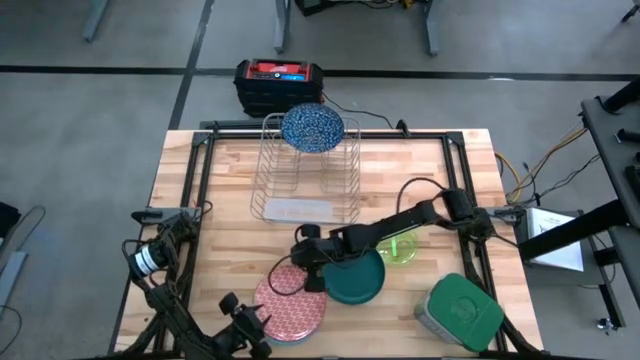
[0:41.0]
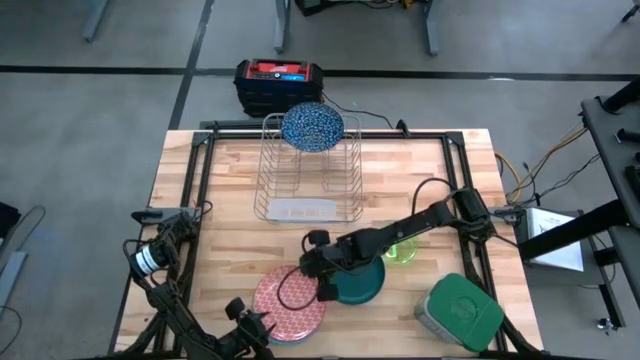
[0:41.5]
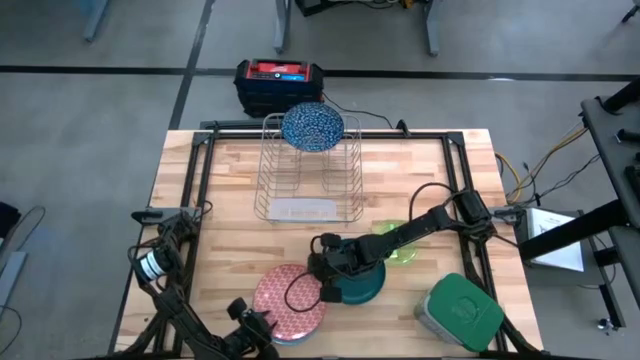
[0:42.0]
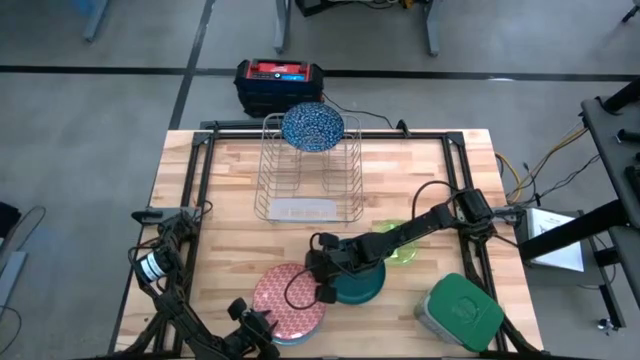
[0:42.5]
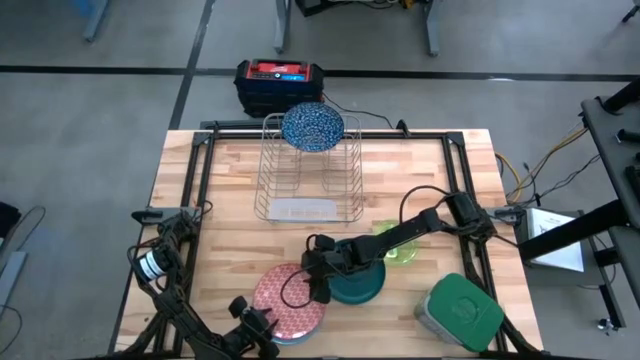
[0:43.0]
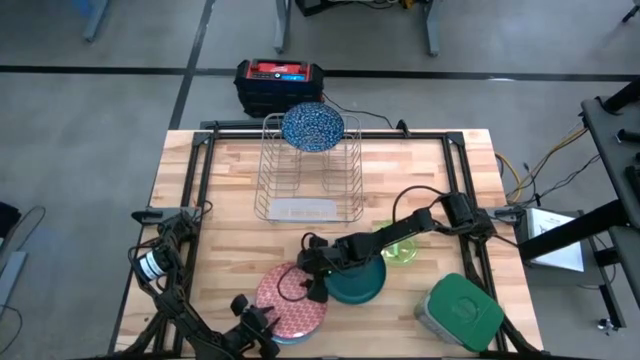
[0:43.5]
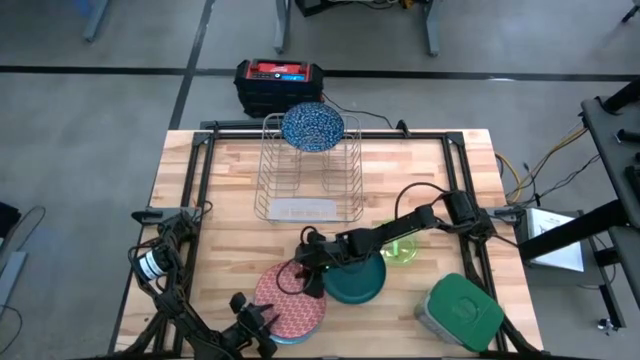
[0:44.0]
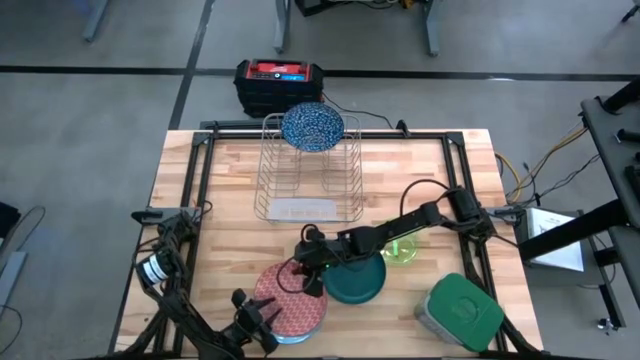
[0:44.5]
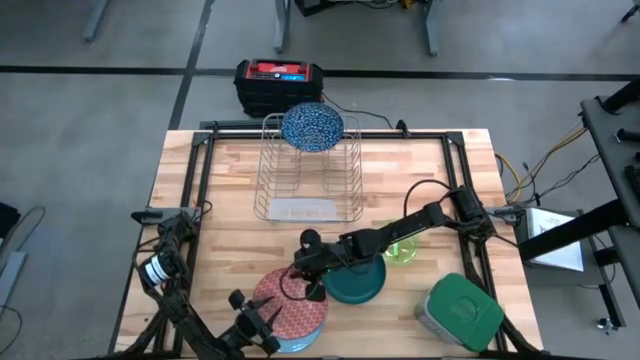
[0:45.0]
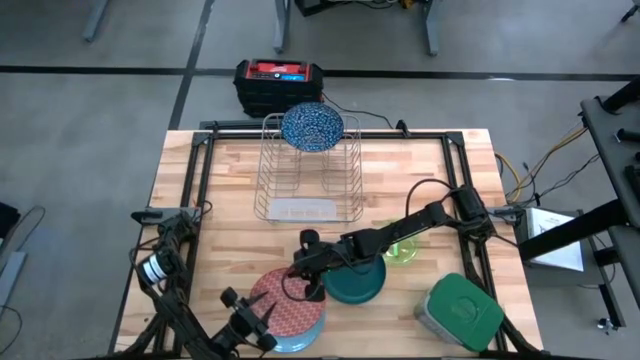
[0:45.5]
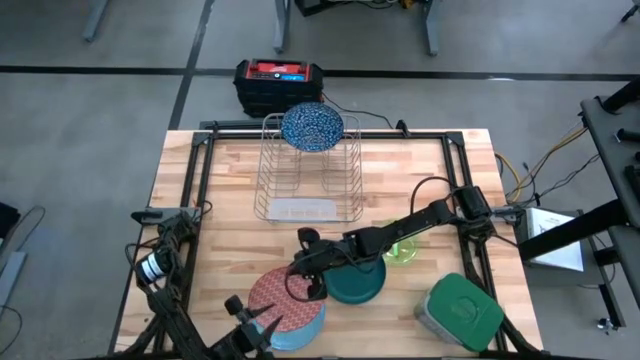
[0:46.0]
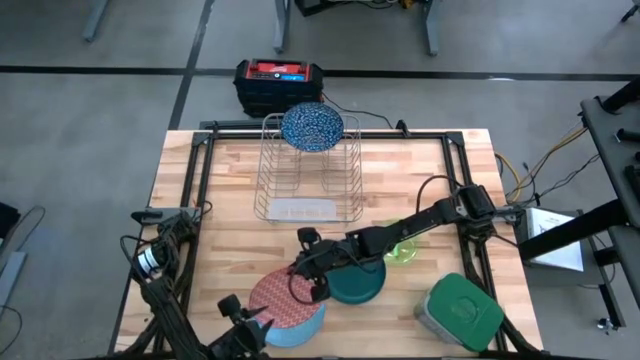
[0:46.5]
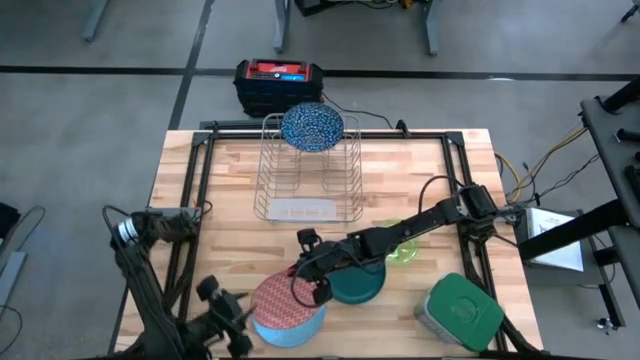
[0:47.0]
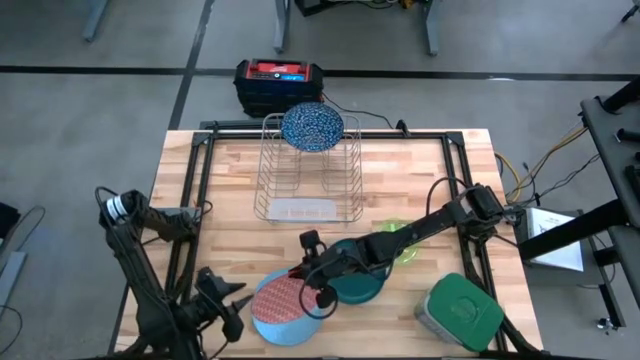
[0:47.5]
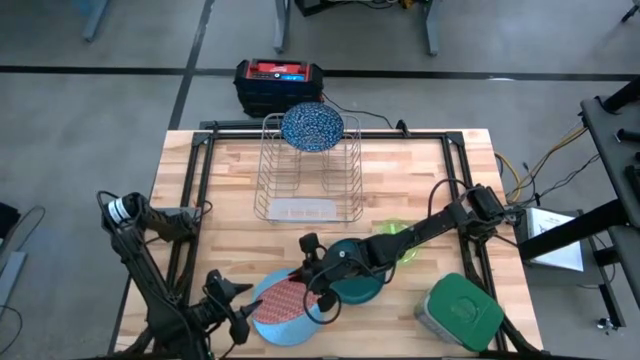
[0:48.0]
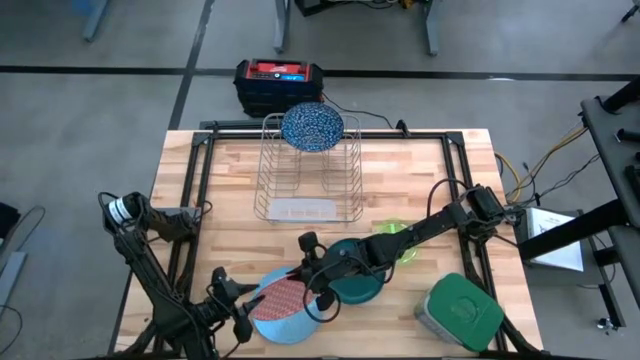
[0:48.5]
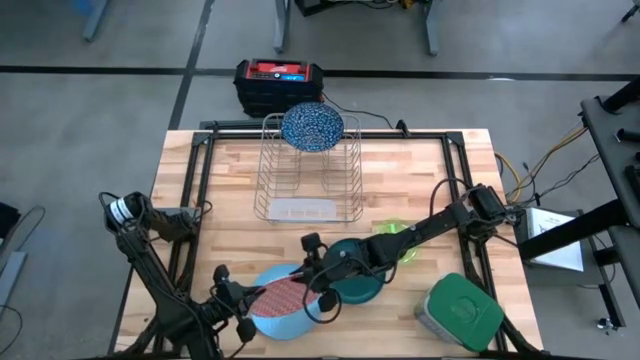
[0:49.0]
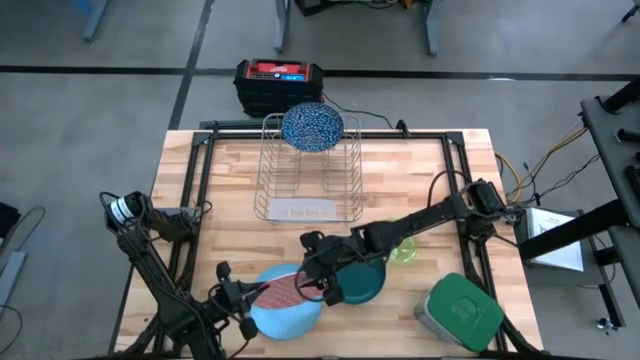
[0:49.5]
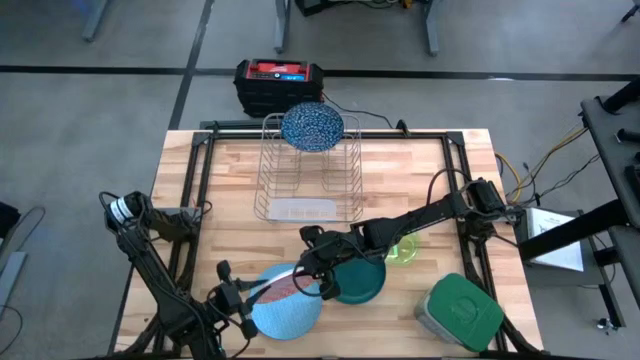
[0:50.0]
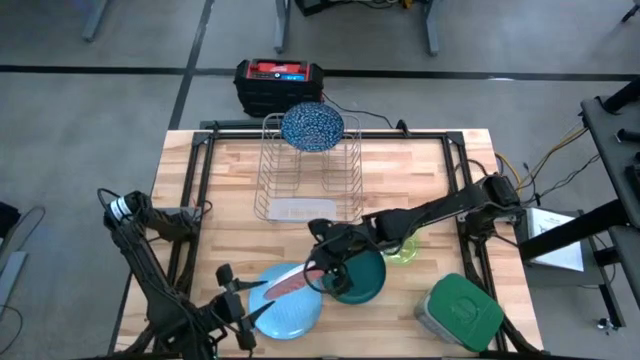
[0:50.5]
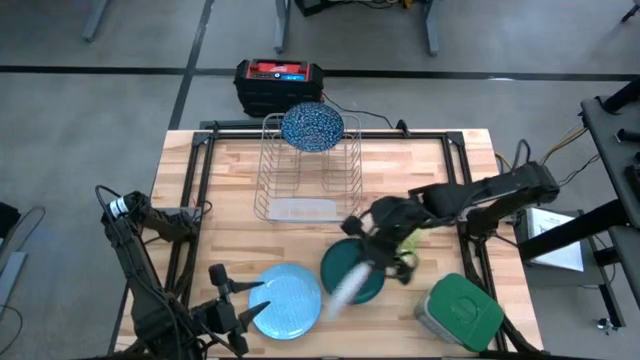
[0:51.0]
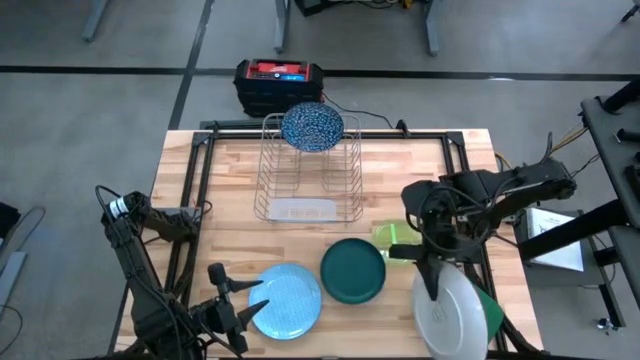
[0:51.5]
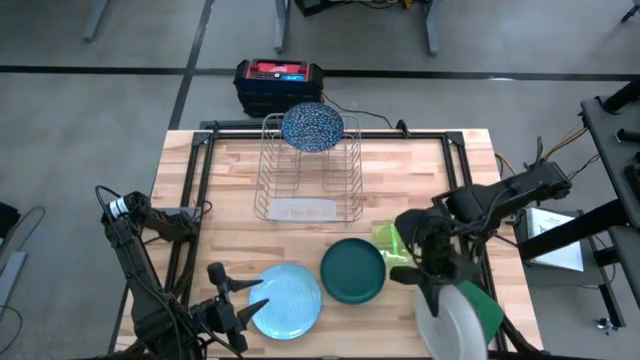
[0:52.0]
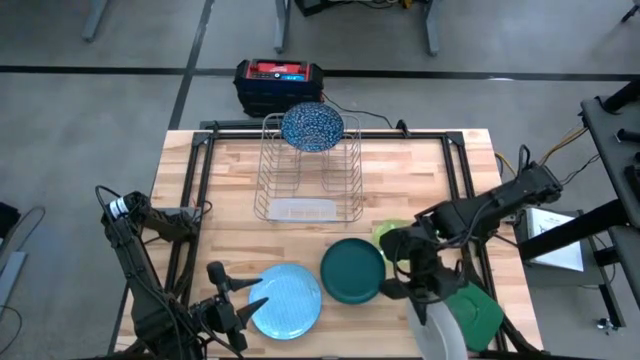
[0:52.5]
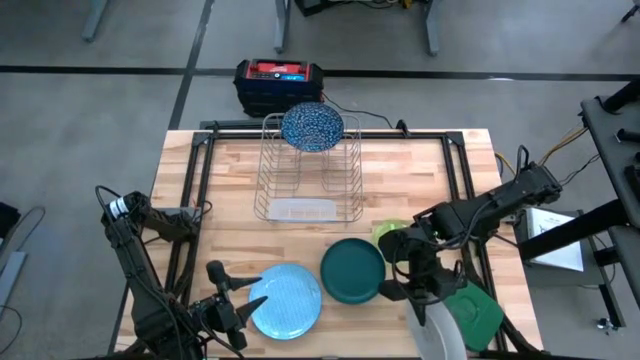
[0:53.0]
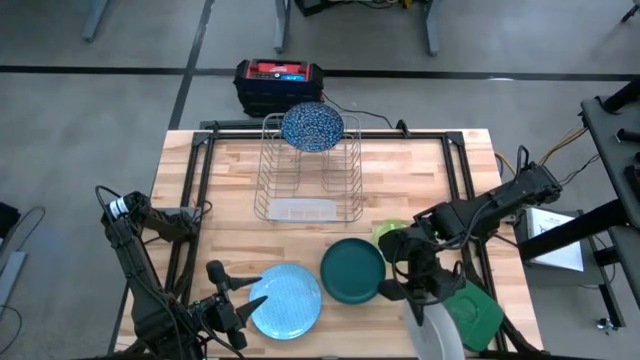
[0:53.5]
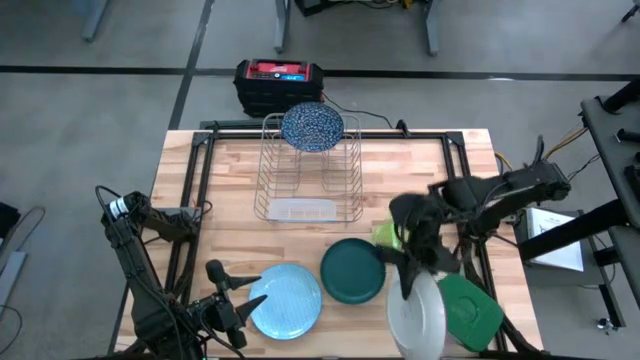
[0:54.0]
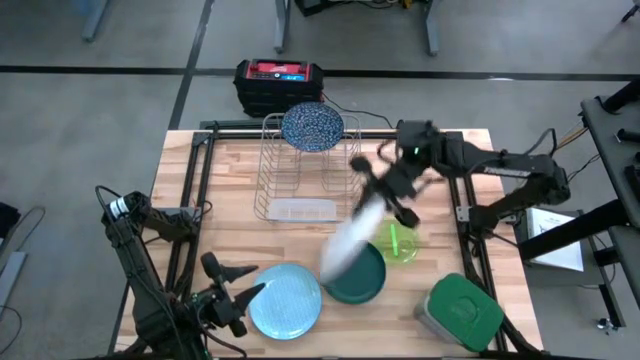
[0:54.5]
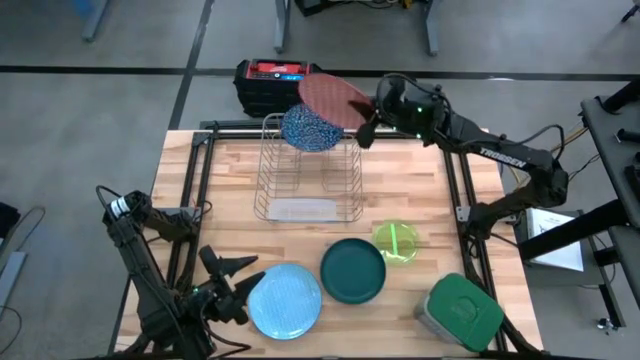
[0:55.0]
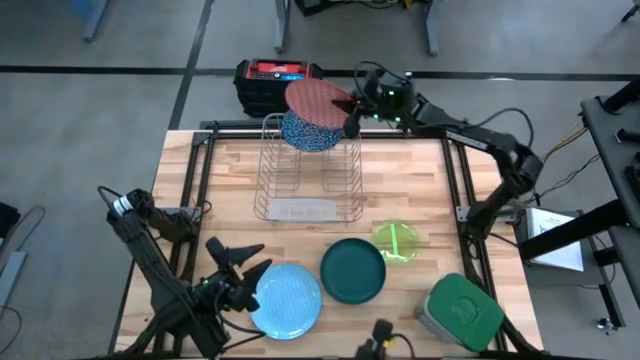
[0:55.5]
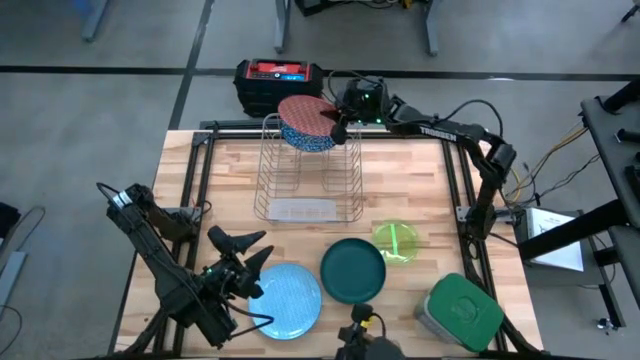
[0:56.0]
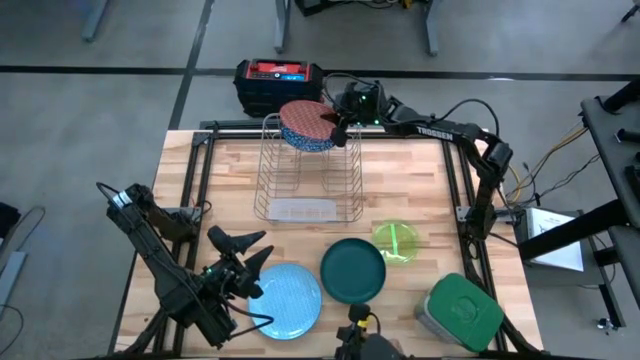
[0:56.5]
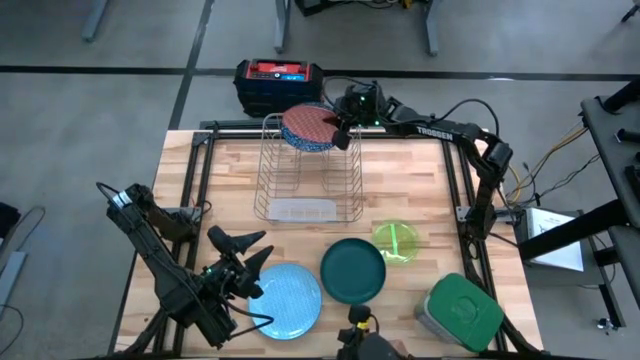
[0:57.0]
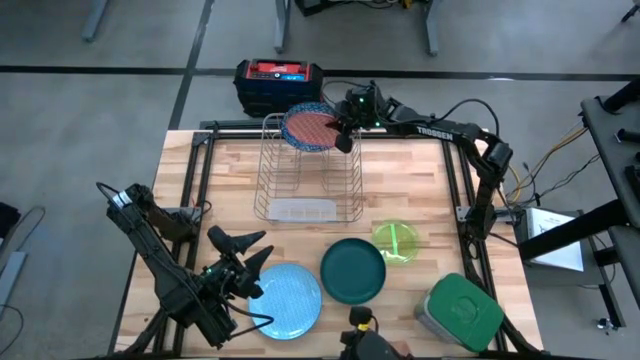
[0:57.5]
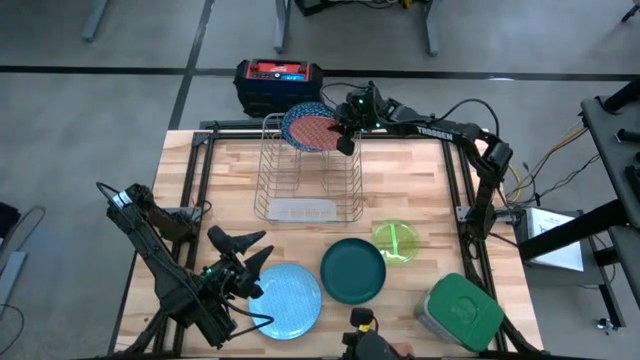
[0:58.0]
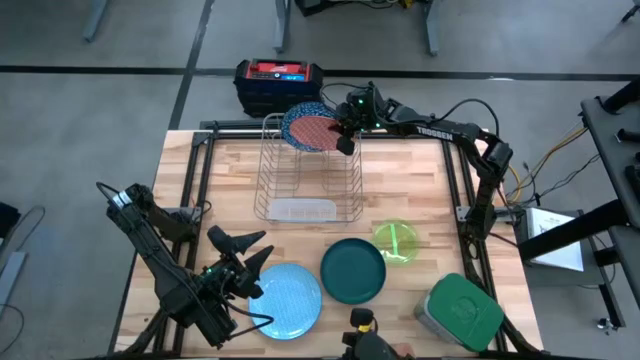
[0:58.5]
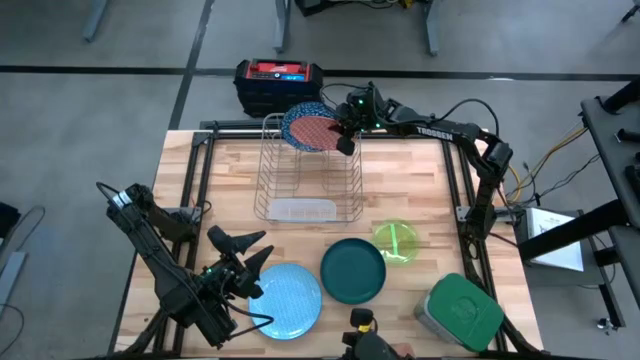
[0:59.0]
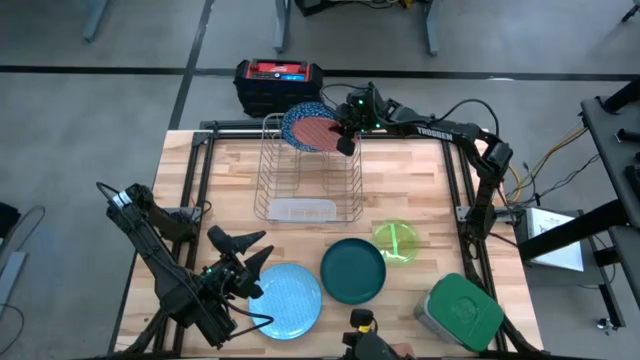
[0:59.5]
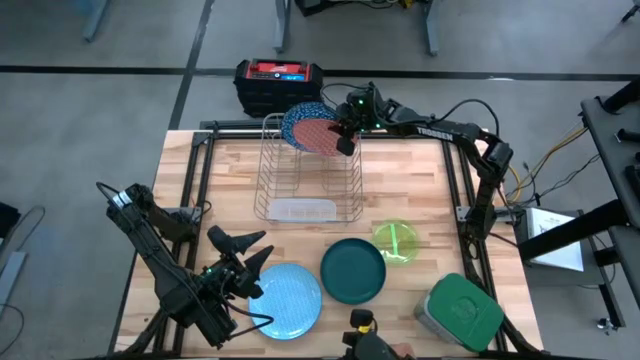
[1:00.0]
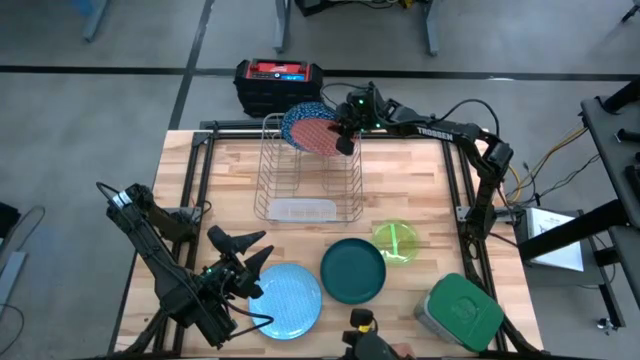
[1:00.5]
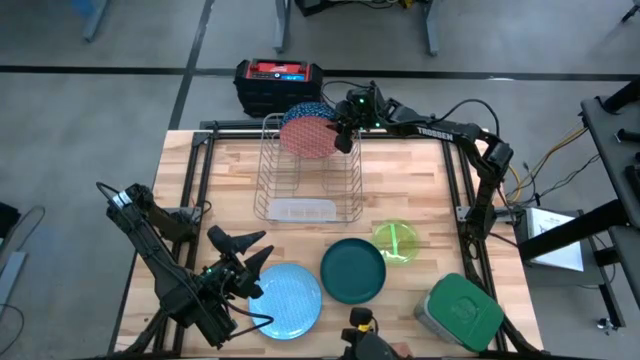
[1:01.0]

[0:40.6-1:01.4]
Task: Sort dishes
Put the orange patterned plate into the dish rack
